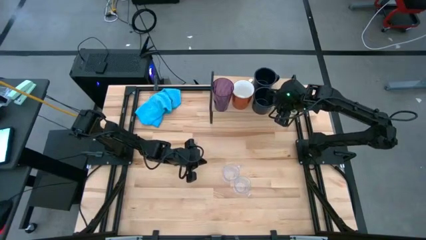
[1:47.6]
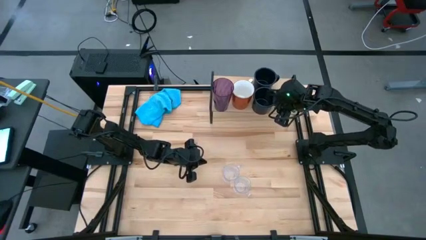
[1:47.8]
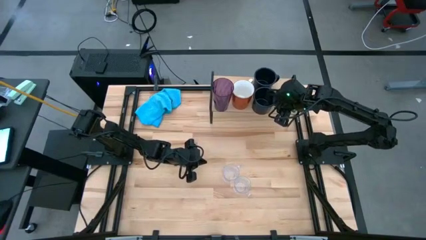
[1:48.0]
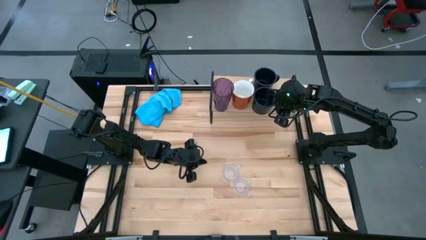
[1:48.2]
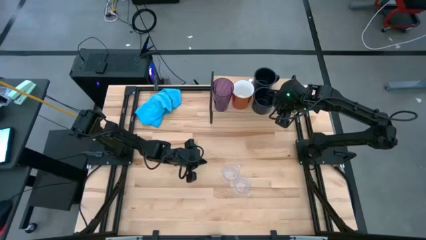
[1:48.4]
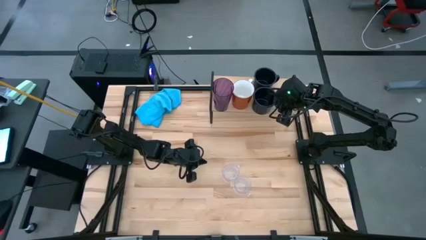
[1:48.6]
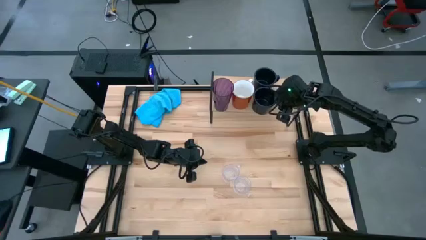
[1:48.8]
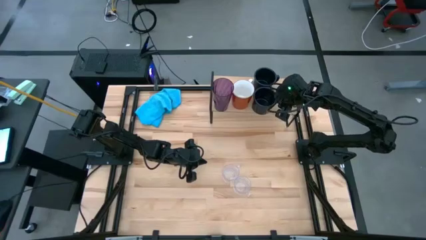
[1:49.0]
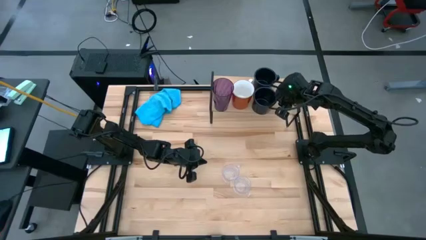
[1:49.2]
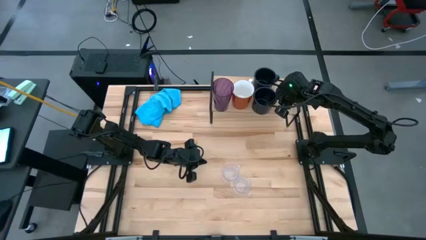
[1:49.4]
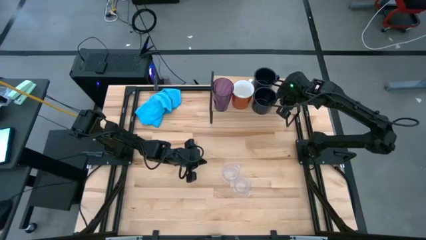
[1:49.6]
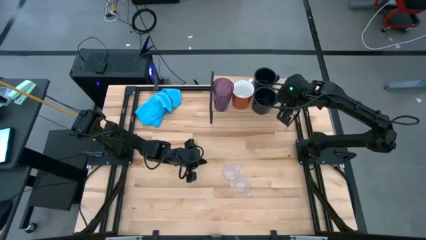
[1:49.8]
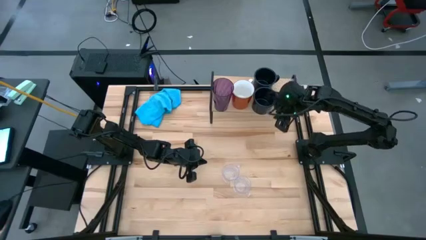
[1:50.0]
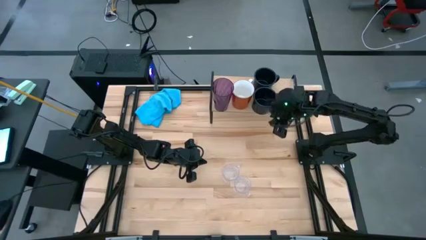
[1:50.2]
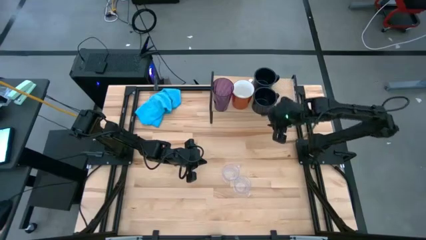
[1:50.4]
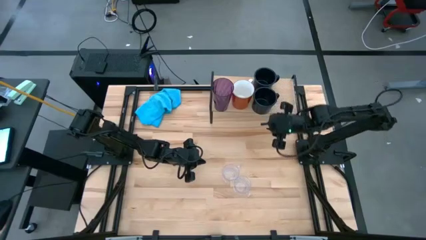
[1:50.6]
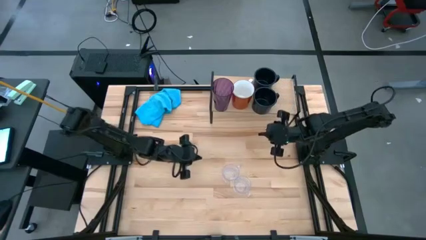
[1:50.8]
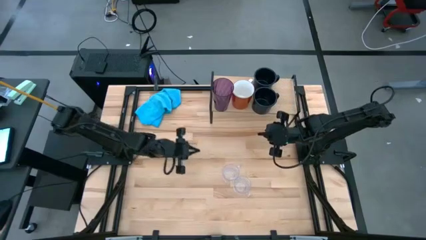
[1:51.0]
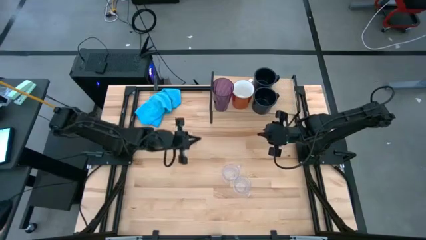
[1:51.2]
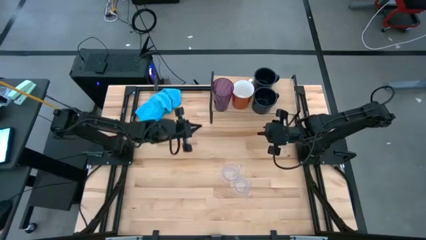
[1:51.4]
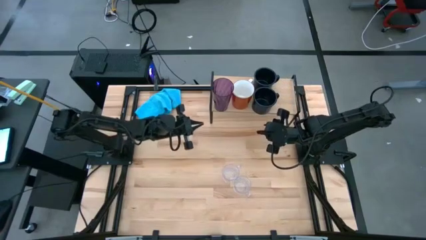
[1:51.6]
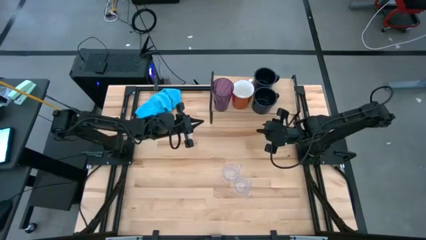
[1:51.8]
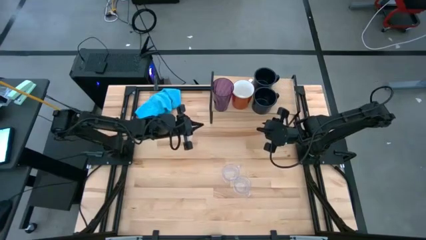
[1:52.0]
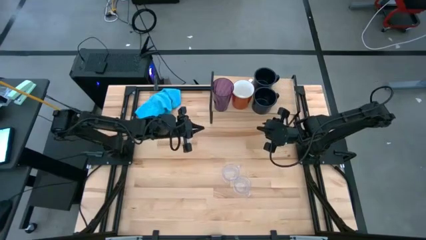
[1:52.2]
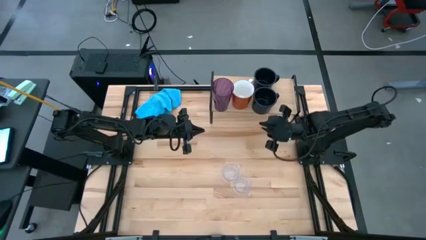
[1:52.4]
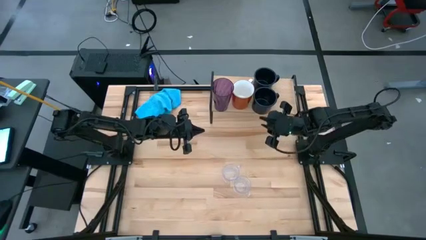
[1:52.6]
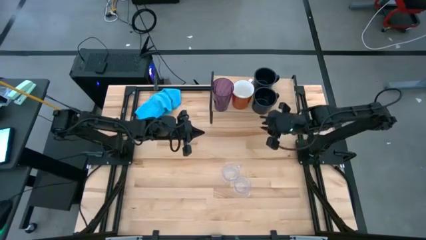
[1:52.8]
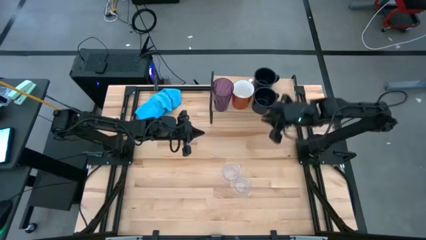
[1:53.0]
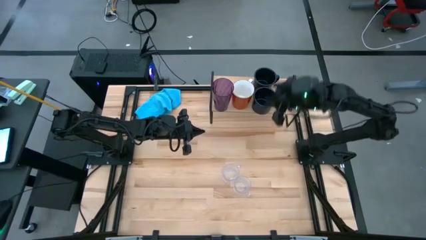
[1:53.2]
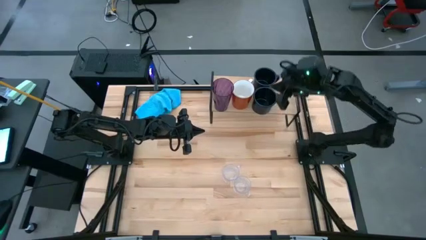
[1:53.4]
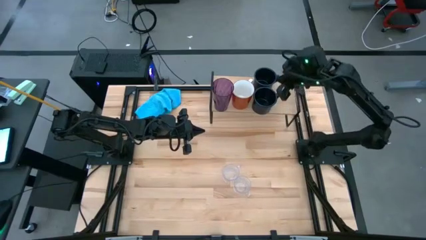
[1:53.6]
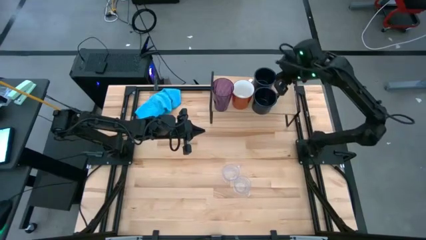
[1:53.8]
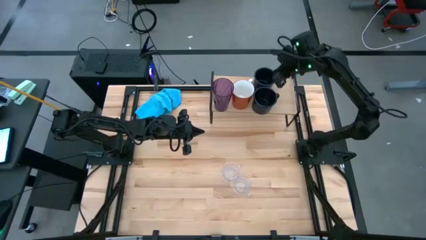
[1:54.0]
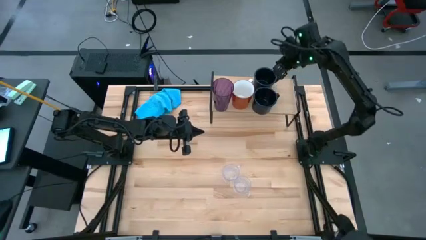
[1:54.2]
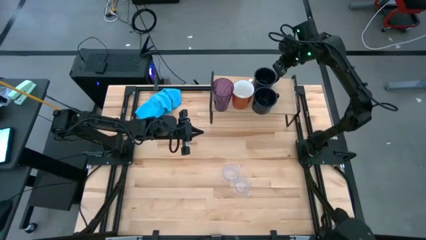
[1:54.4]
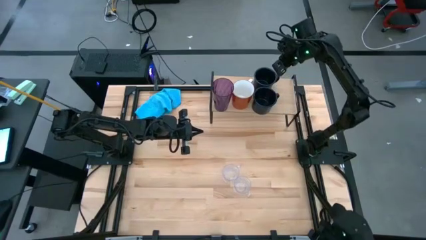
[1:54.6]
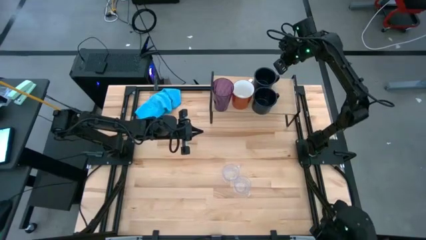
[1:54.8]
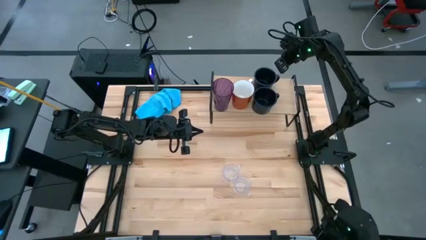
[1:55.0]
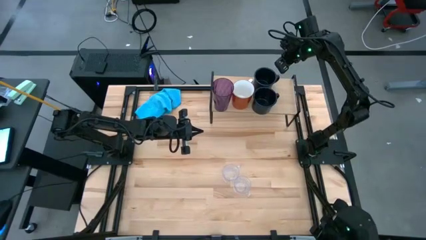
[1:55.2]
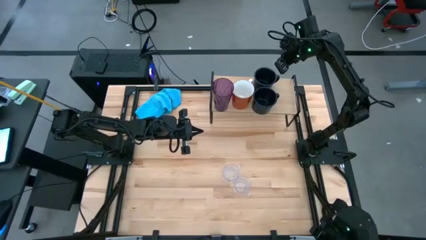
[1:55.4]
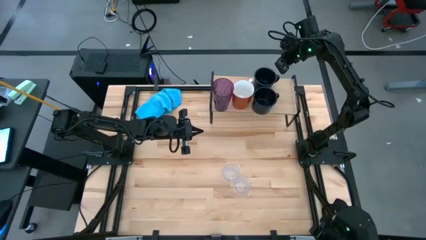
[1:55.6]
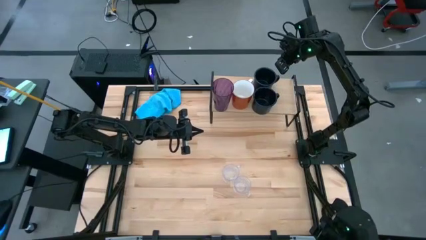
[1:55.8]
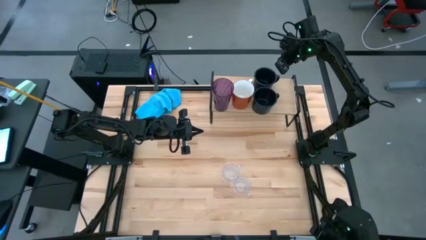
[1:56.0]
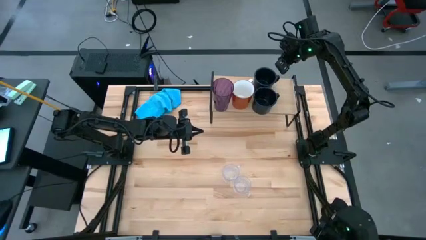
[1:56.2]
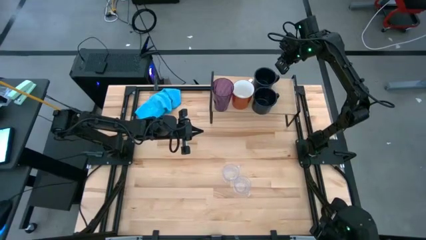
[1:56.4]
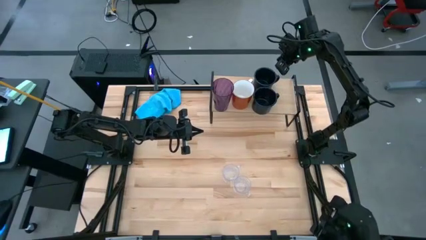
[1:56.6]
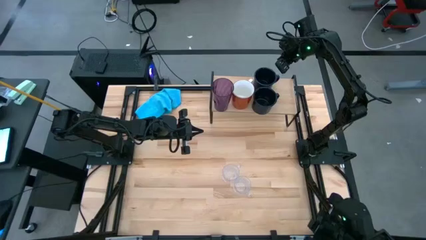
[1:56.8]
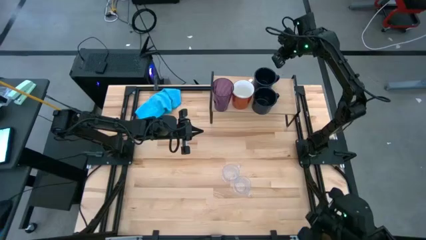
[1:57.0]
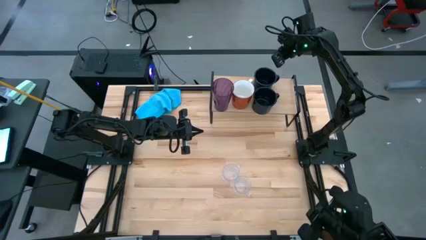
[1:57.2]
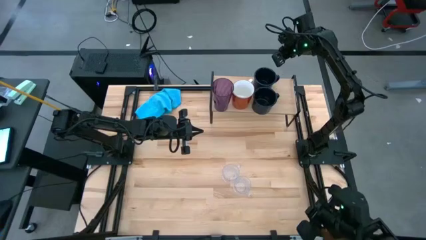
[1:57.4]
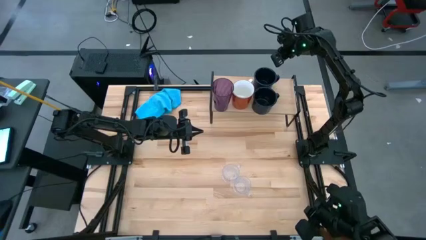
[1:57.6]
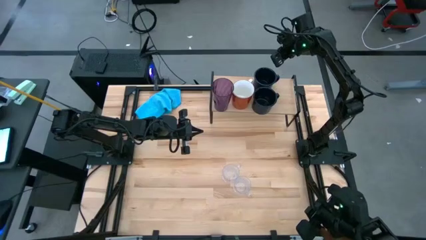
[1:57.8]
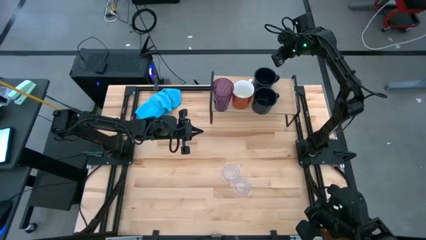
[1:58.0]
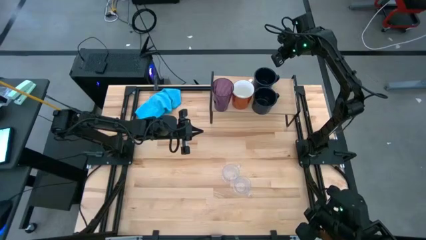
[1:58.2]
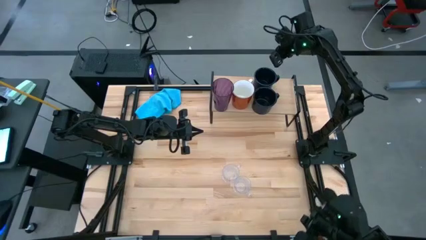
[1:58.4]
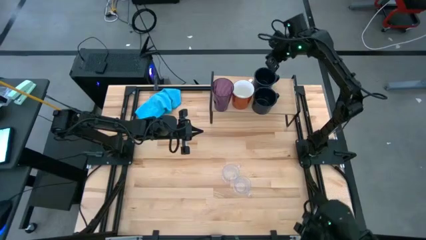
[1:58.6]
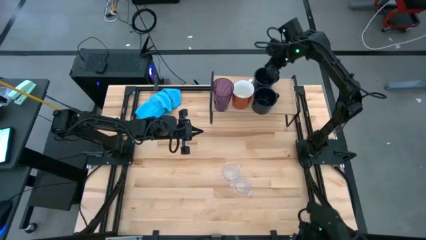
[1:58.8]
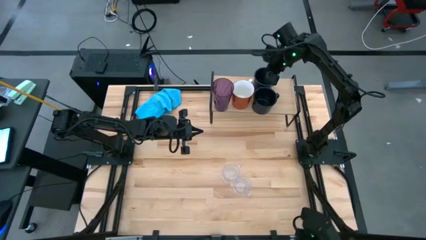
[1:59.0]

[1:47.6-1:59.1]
Task: Stack small to large cups/mugs on shelf
Adjust the black mugs on the shelf
